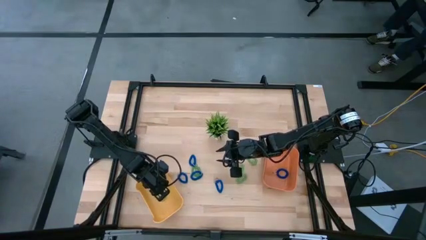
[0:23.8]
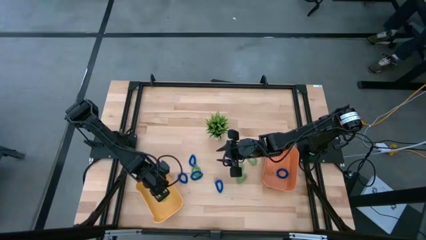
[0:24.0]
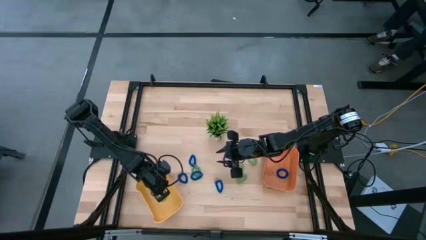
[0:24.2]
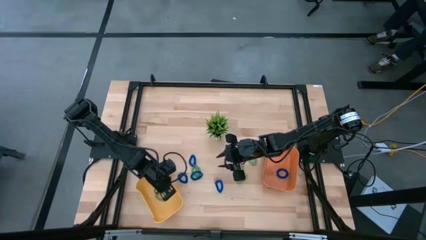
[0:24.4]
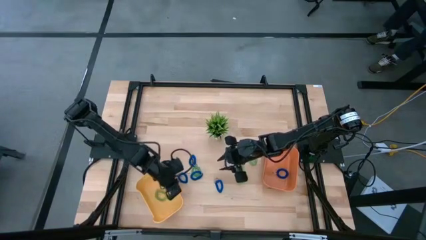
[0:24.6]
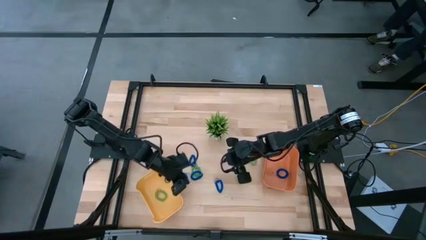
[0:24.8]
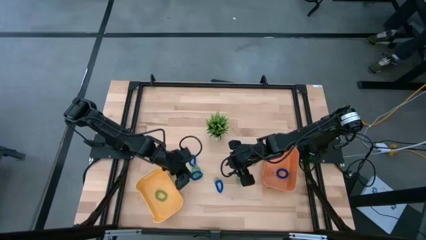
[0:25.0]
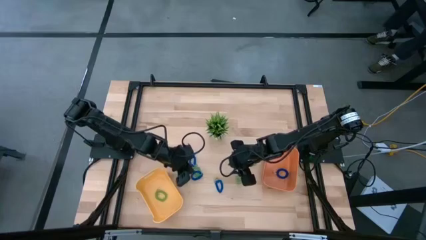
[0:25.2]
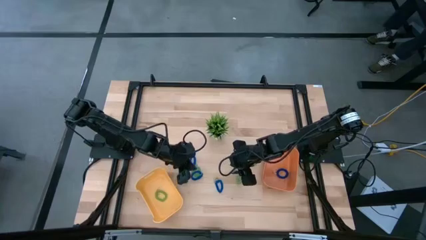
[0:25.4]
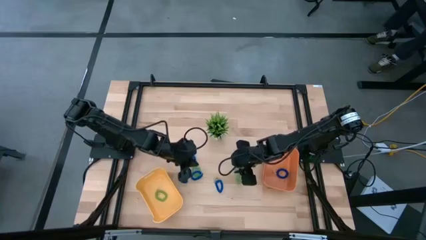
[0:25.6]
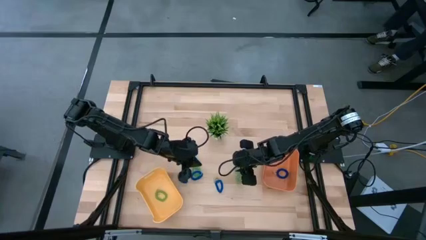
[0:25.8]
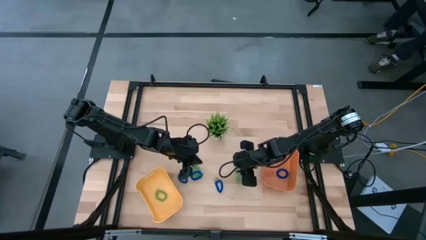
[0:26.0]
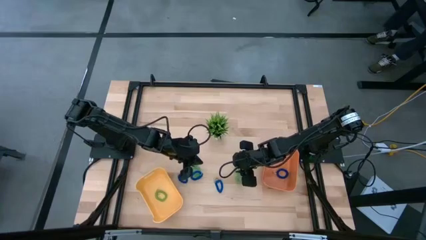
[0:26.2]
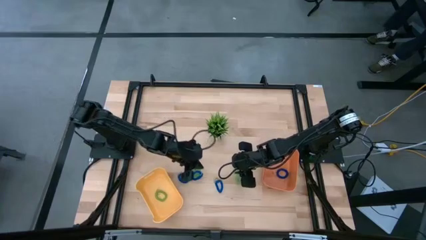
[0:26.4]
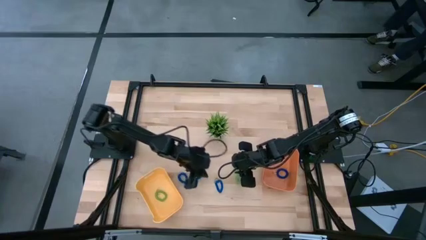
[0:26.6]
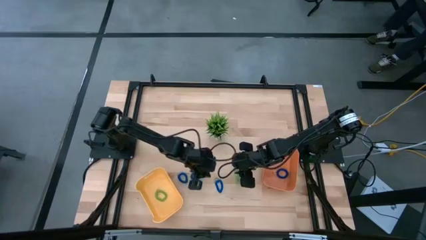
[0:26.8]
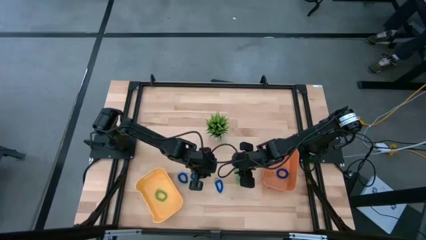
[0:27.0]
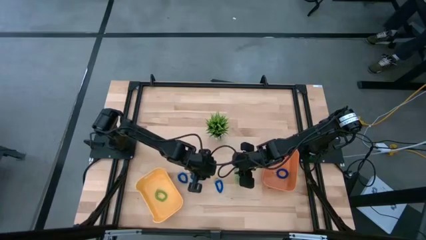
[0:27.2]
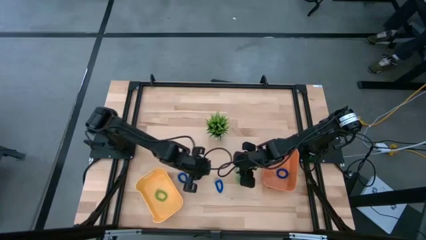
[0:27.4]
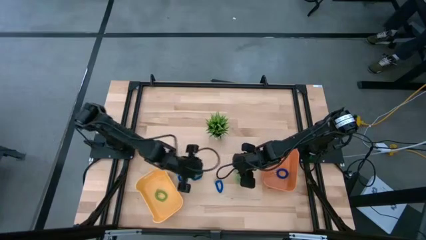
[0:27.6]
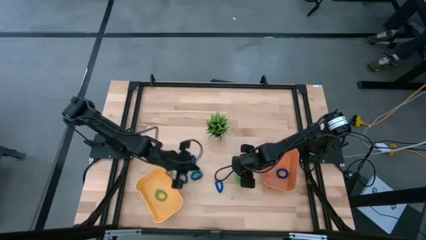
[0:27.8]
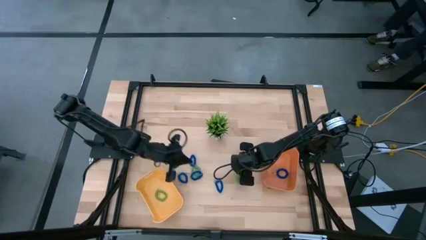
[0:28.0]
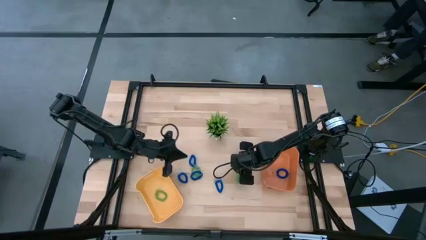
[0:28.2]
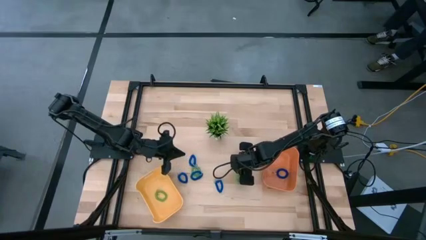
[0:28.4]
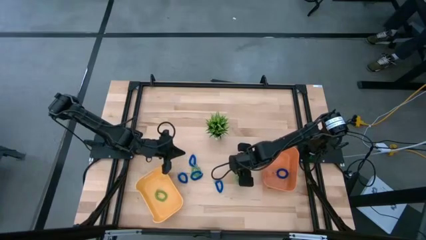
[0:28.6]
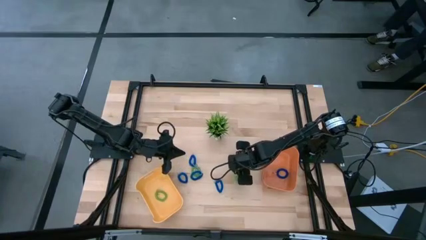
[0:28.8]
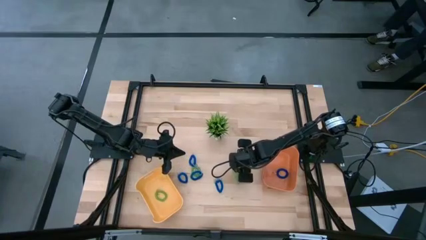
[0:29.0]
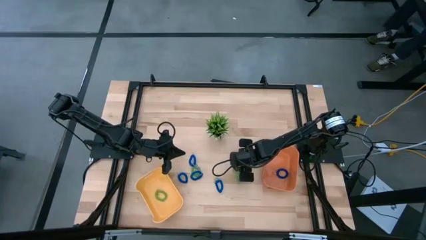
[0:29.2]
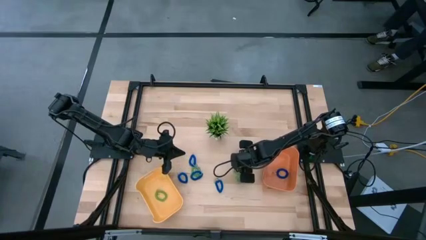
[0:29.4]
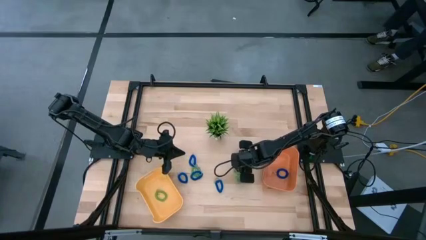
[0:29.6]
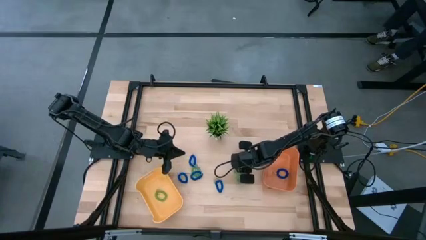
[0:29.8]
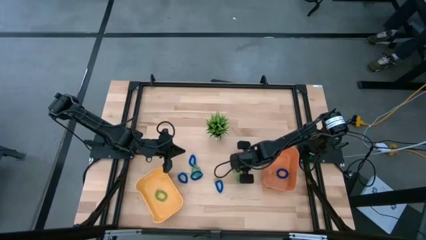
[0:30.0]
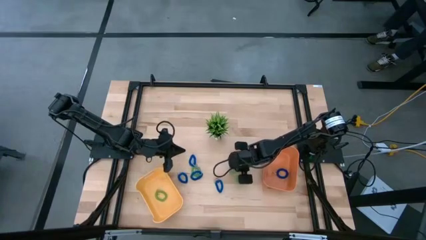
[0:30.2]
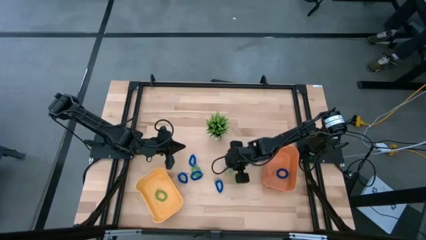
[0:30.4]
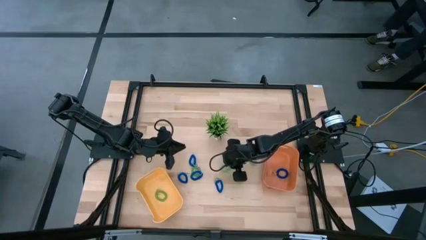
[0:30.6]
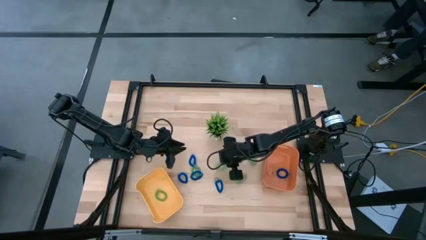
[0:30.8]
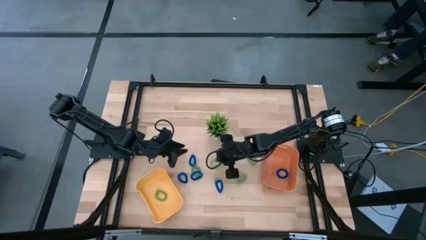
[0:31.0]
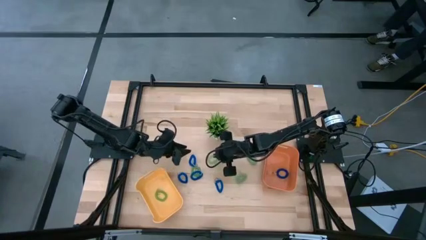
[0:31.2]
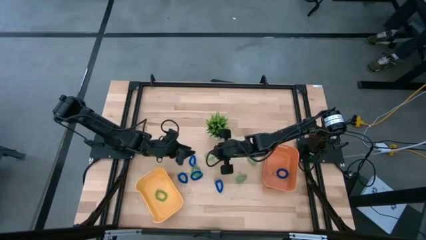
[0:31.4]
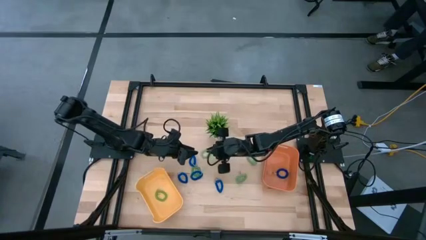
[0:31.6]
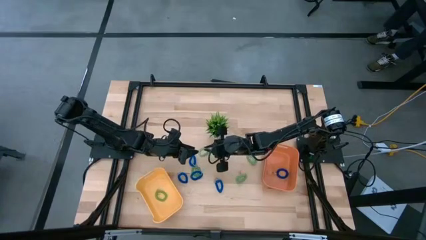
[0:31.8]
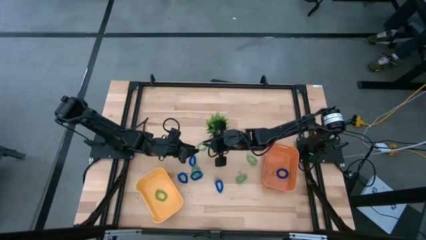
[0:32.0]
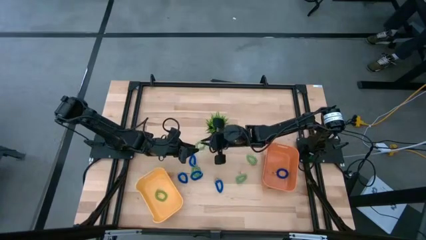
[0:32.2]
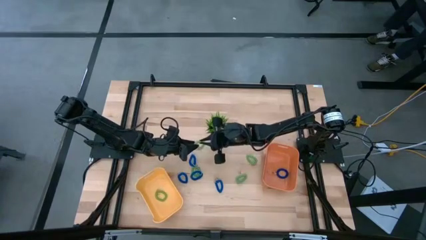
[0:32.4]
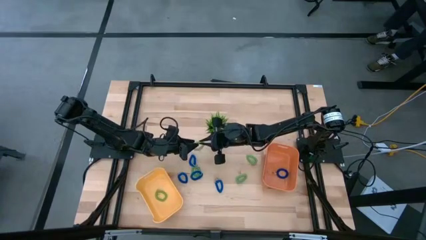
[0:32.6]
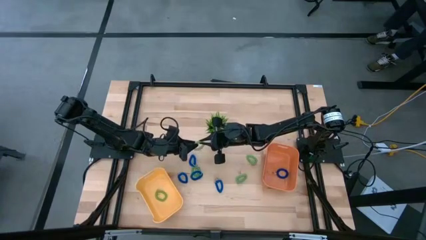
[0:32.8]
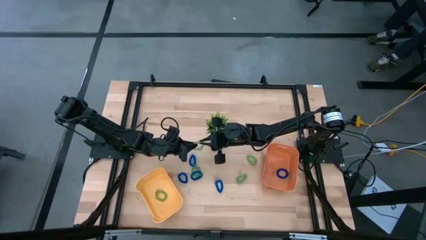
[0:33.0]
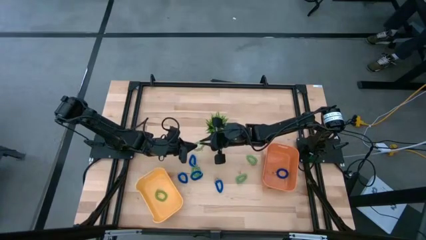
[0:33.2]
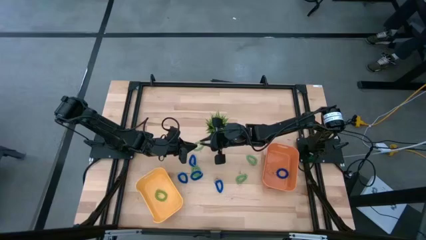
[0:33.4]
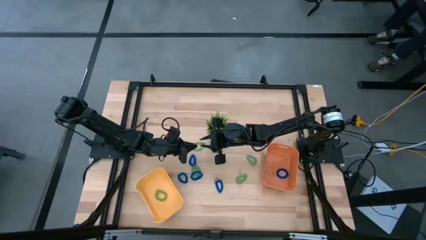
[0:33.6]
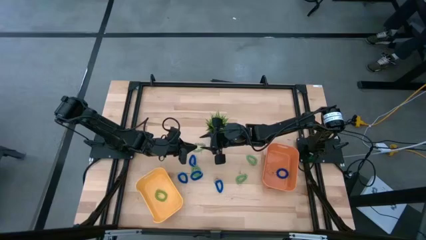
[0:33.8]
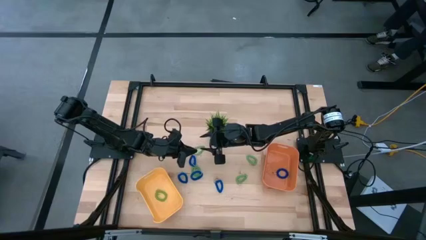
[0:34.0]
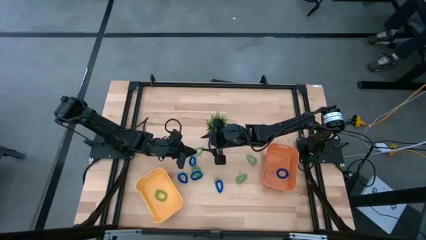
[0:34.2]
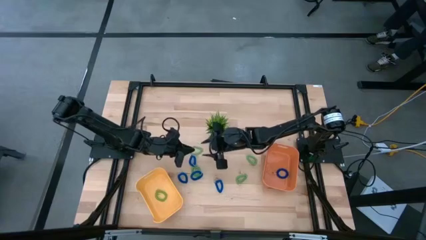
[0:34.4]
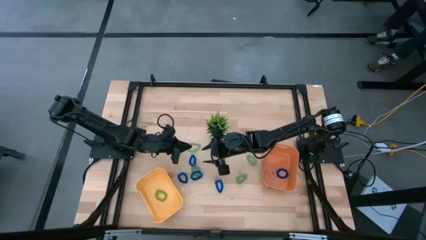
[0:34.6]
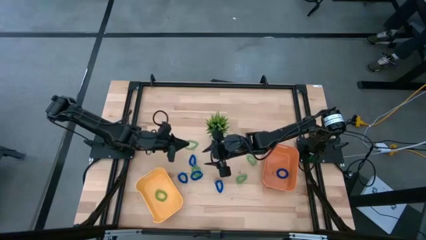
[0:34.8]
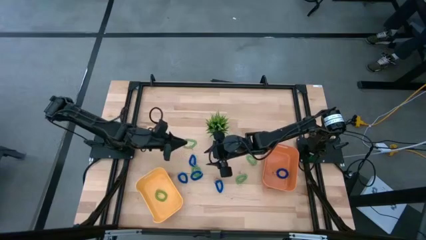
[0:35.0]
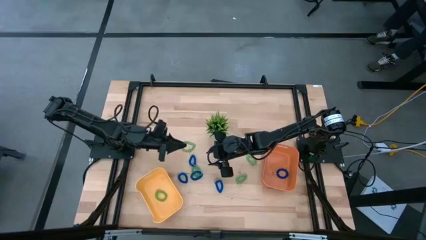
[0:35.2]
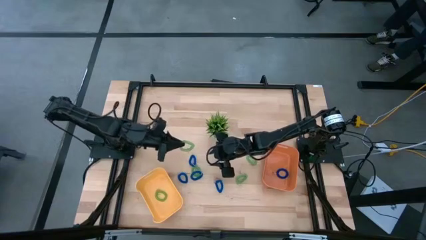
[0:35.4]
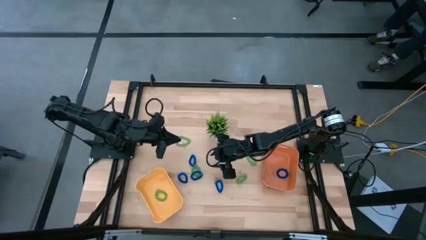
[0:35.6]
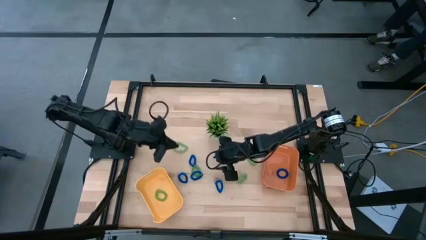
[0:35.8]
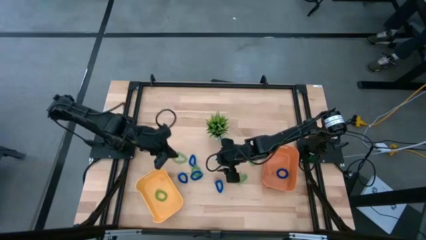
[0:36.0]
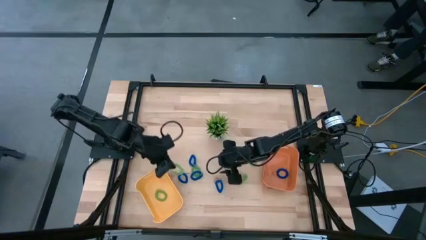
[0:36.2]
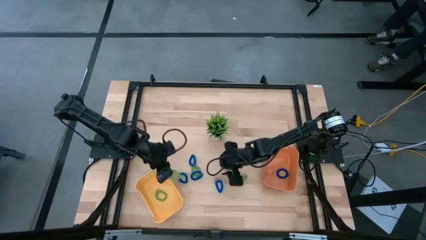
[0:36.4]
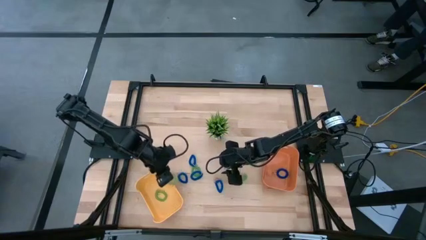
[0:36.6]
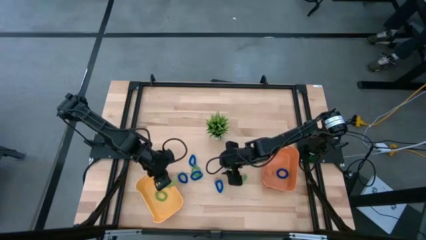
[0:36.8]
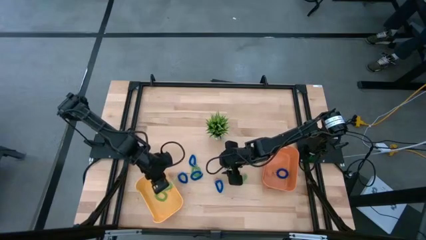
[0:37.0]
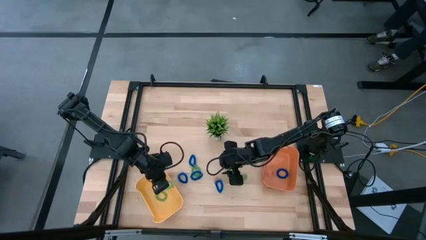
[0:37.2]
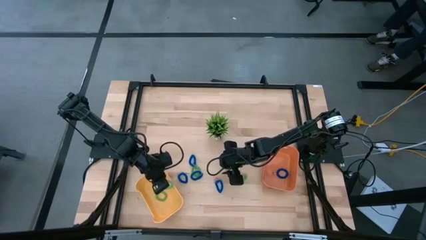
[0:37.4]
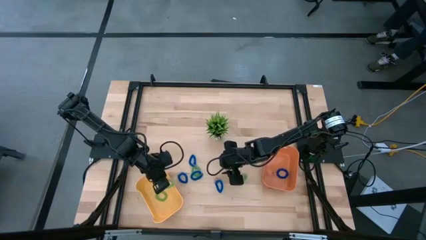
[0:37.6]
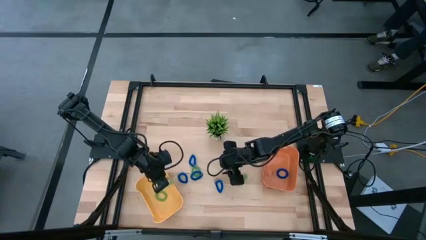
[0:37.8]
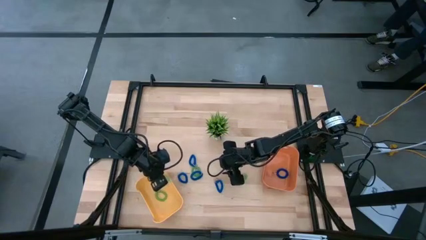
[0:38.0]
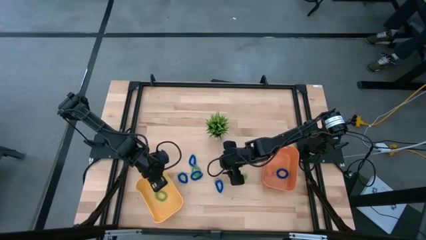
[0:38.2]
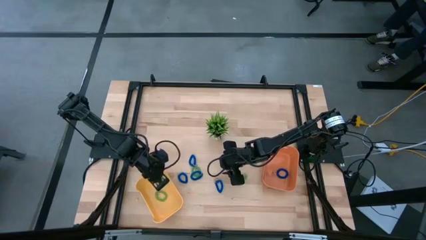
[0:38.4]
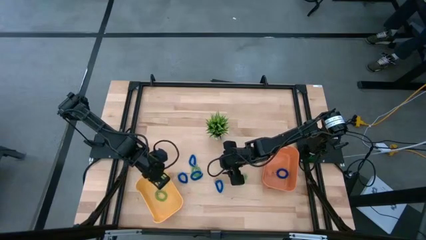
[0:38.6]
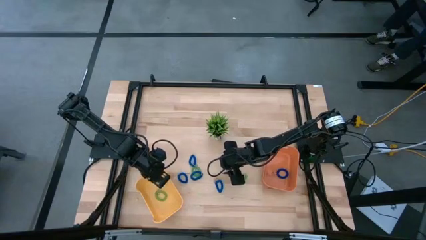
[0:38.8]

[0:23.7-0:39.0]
Task: Sort spring keychains
Put the green spring keychain into the yellow bin
